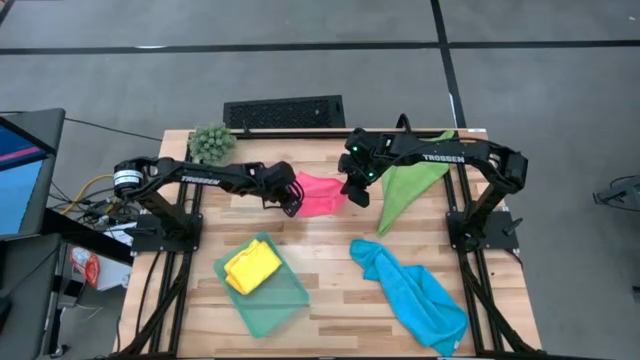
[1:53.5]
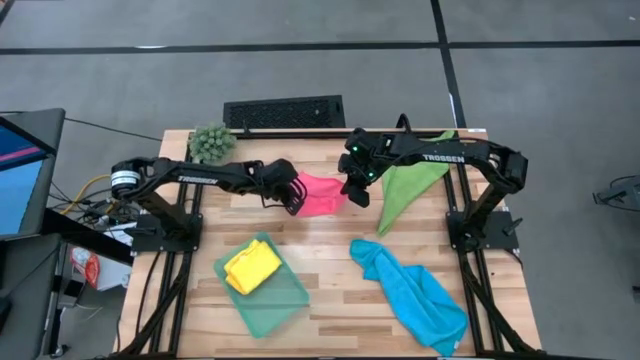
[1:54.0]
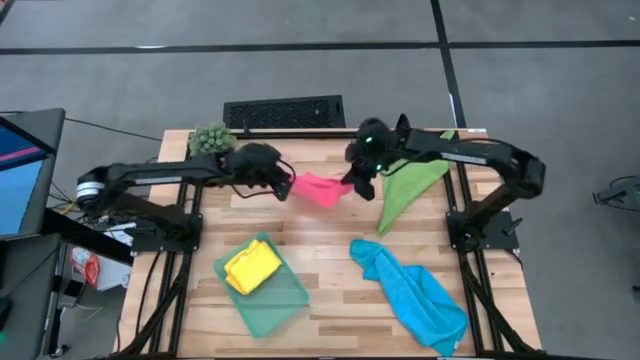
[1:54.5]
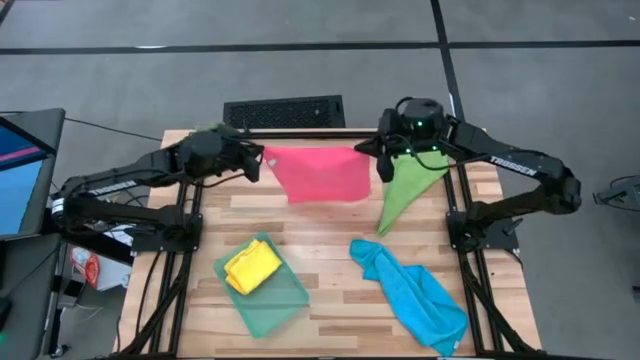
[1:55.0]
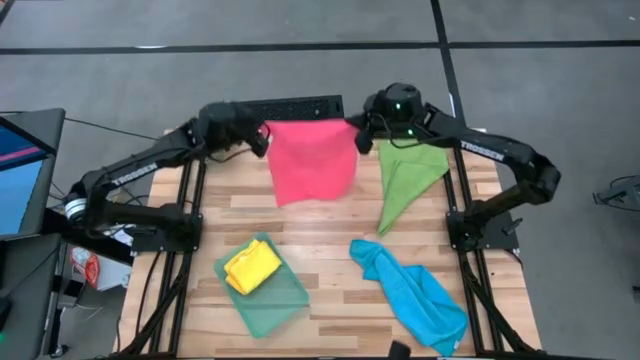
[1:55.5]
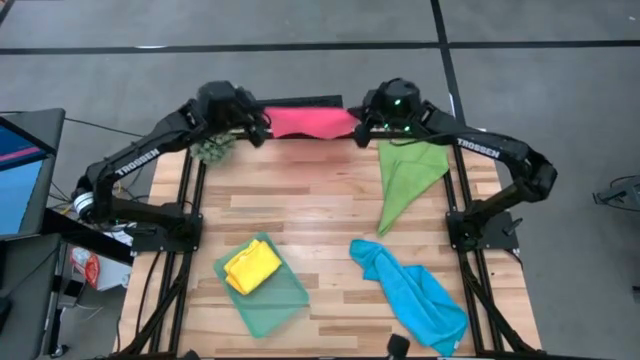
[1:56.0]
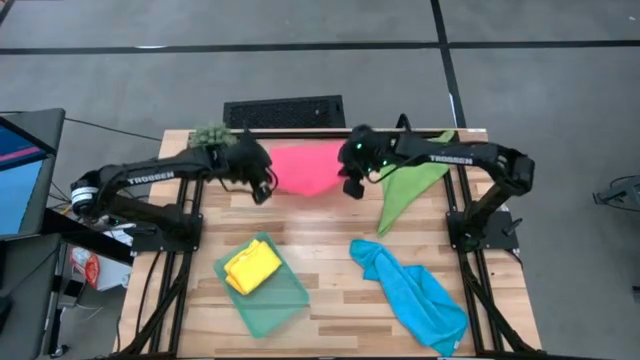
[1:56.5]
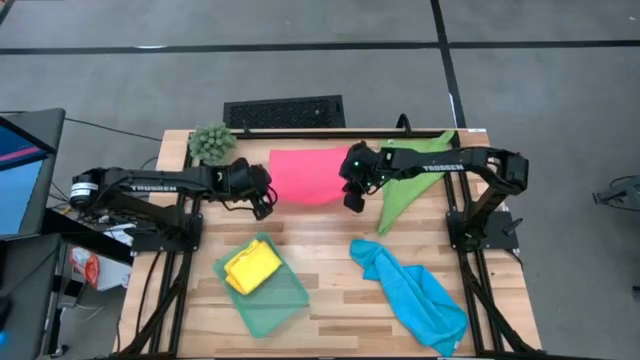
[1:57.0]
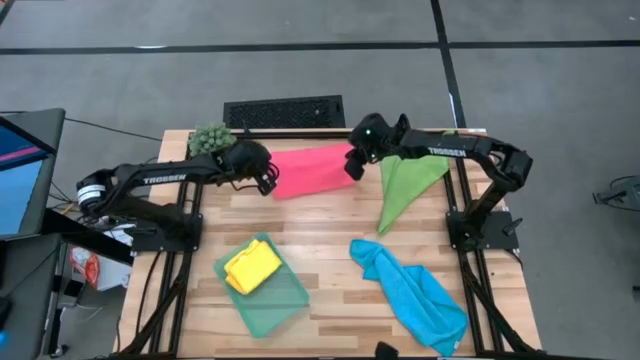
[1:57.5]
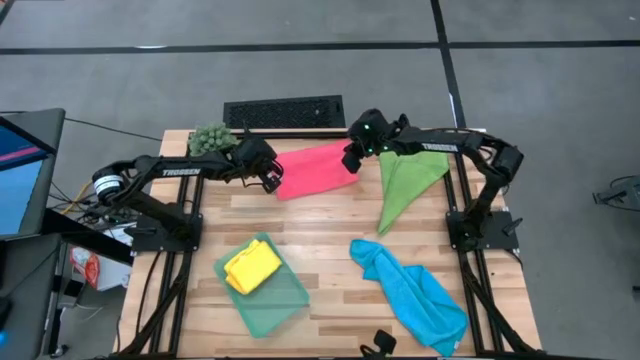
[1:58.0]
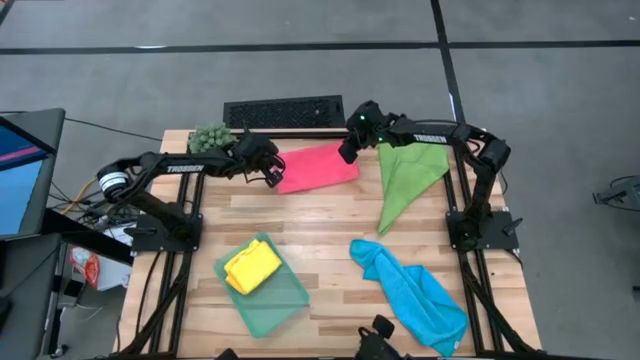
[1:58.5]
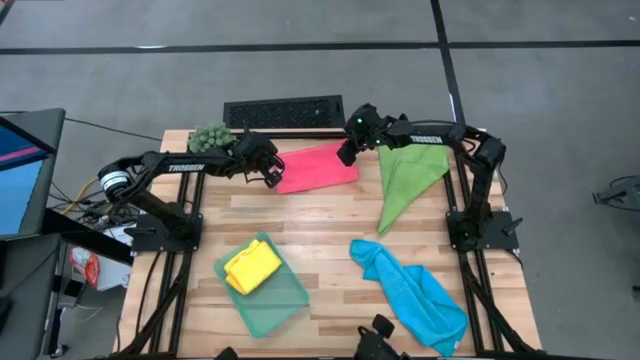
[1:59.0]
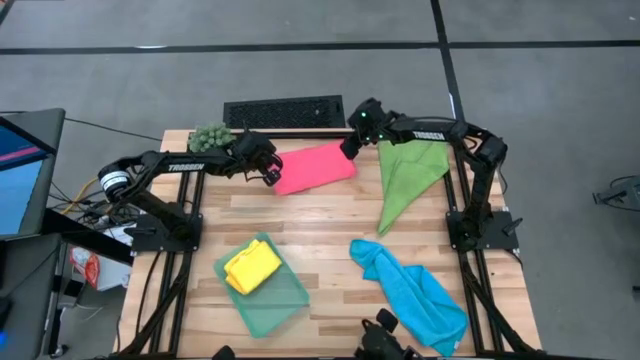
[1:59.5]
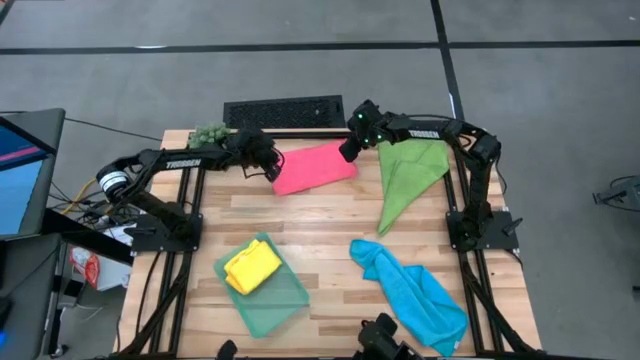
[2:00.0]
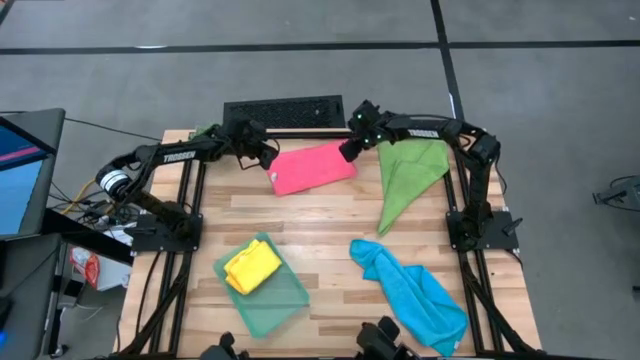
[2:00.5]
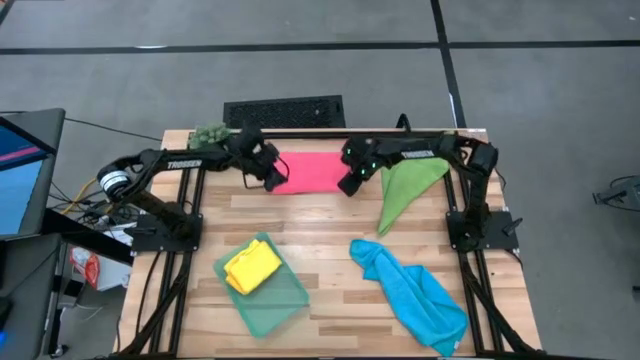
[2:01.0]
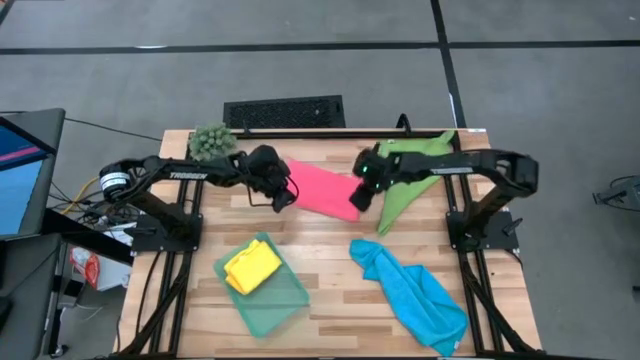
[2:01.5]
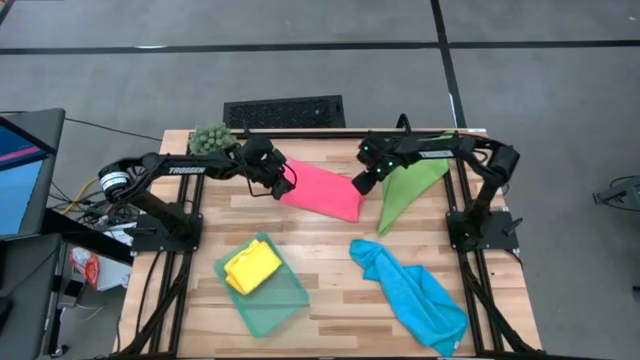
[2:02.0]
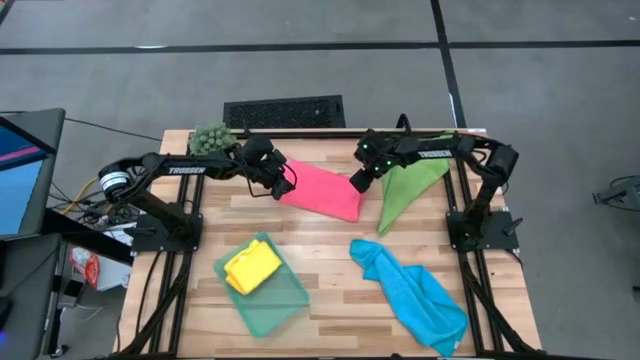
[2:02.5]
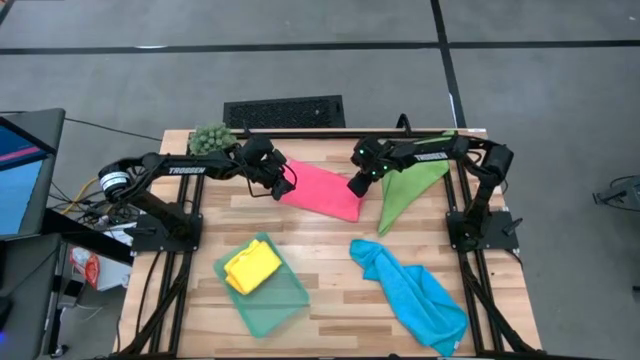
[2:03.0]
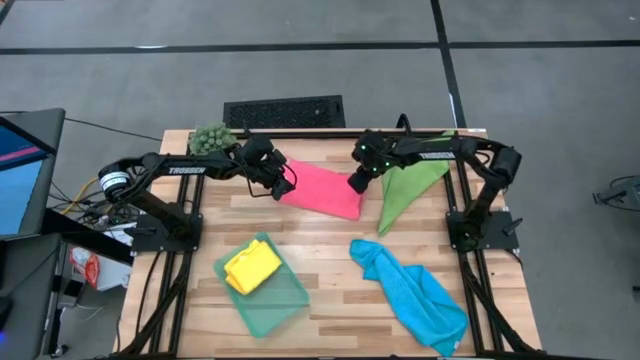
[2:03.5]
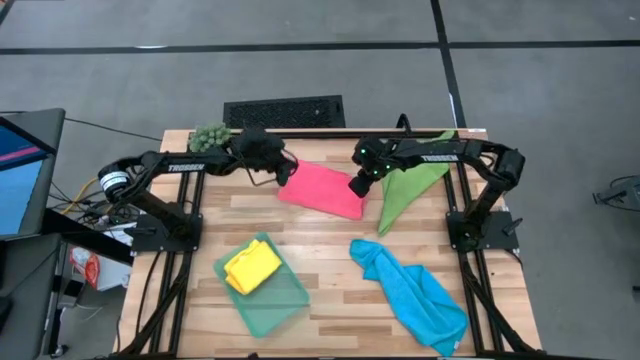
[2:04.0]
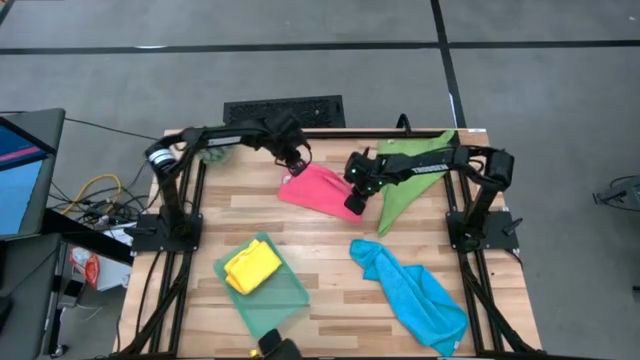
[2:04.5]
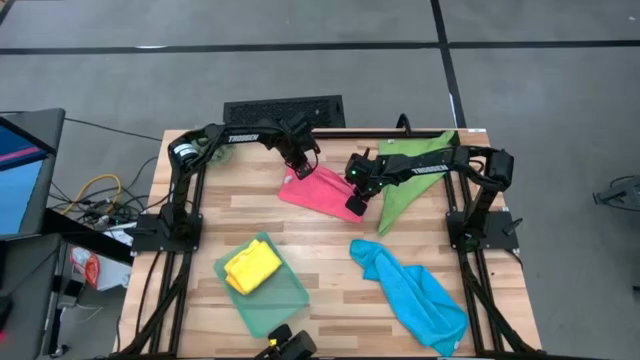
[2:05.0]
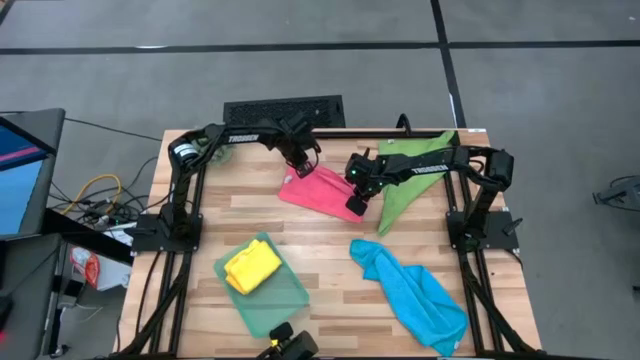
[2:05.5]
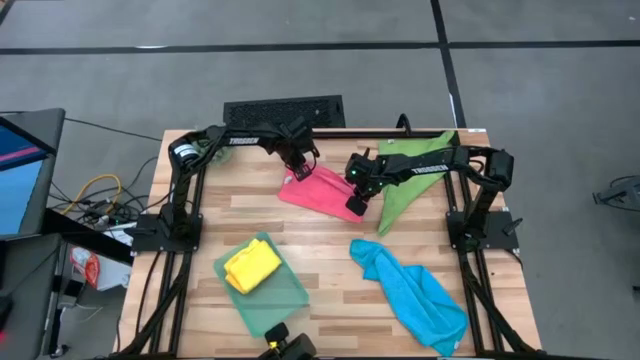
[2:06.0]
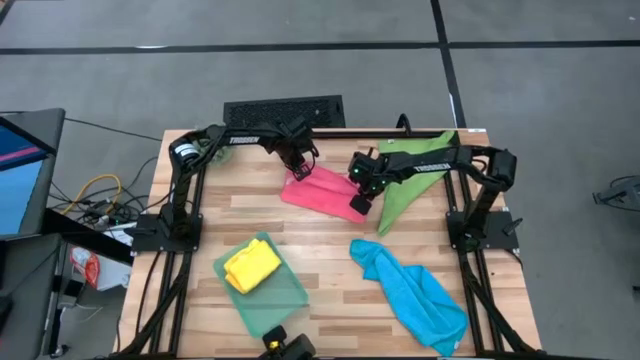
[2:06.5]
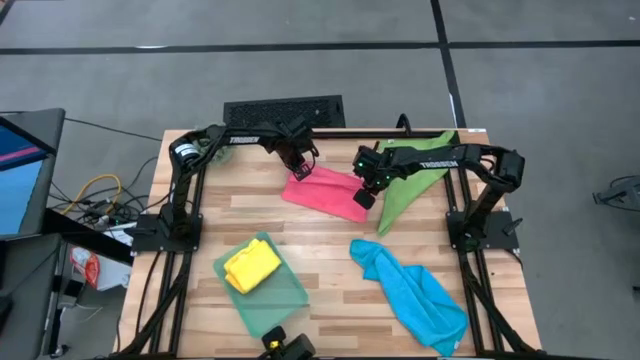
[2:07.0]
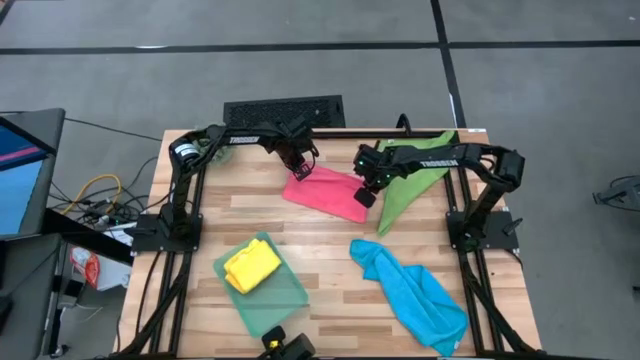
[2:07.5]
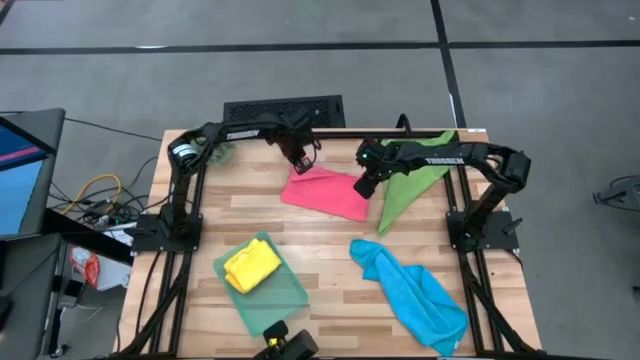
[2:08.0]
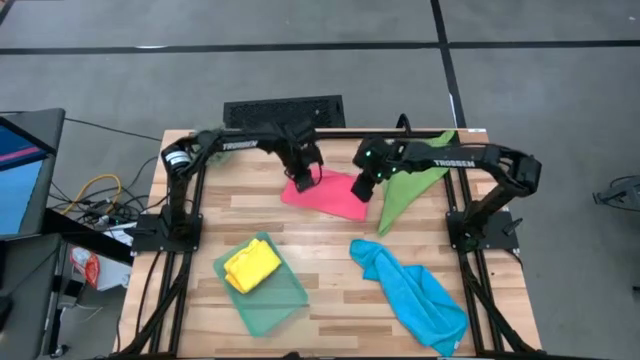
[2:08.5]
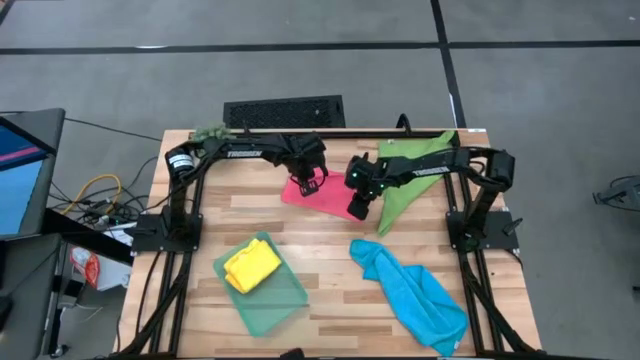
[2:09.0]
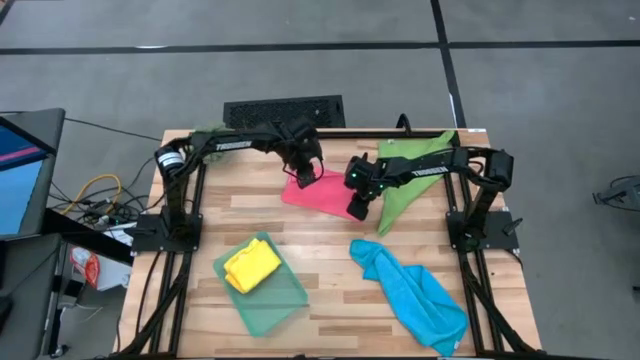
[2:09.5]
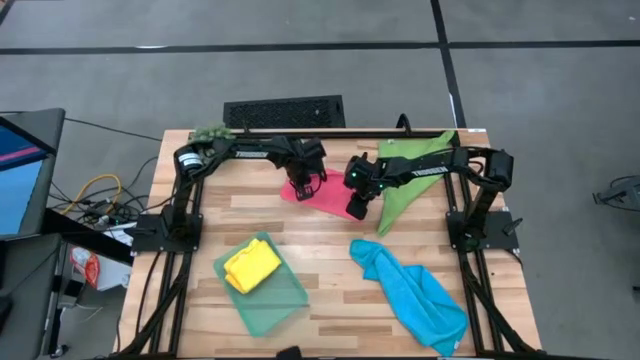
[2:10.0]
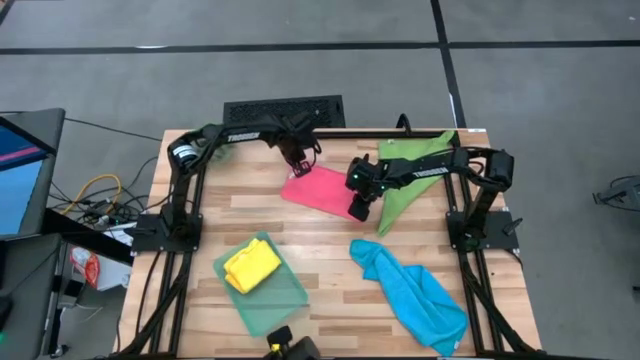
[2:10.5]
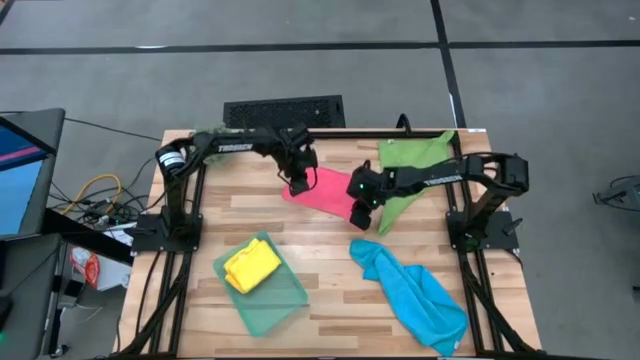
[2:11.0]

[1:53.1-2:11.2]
Task: Fold microfiber towels
Fold the pink towel
